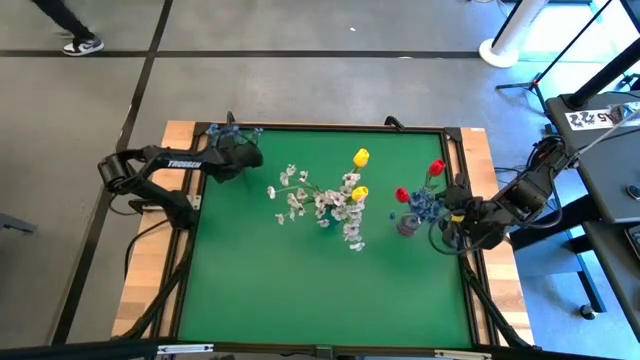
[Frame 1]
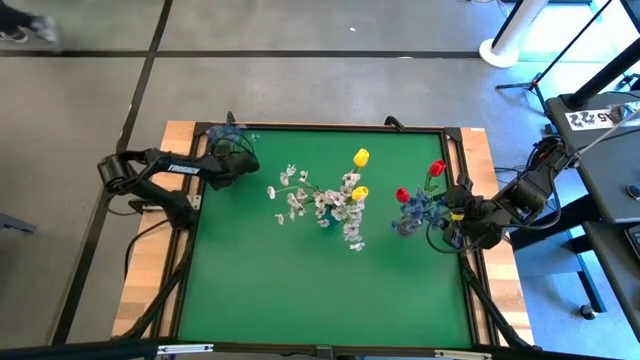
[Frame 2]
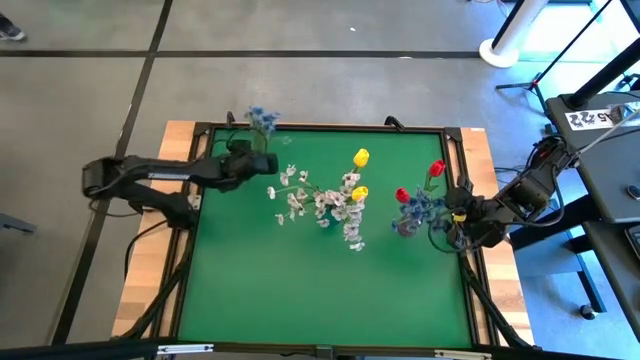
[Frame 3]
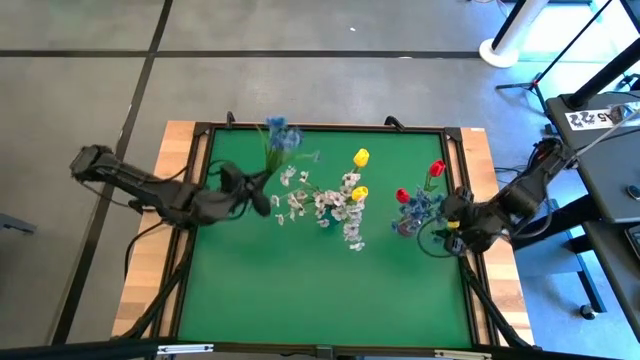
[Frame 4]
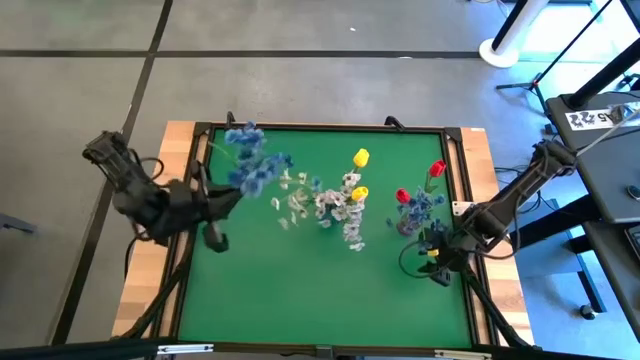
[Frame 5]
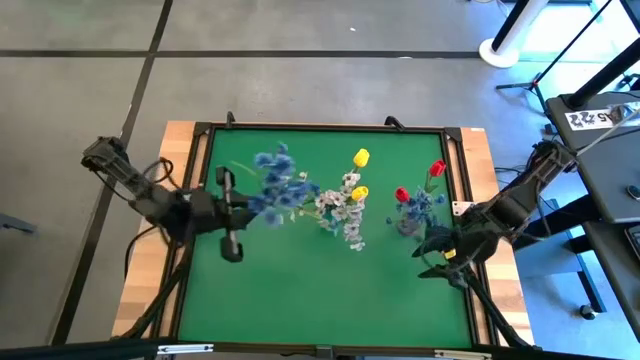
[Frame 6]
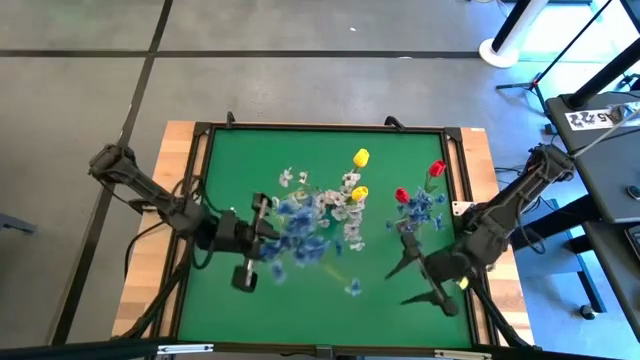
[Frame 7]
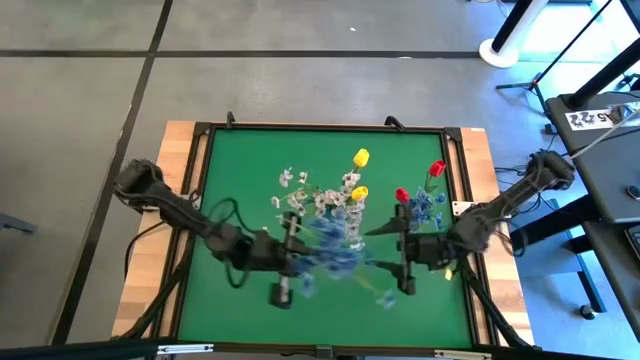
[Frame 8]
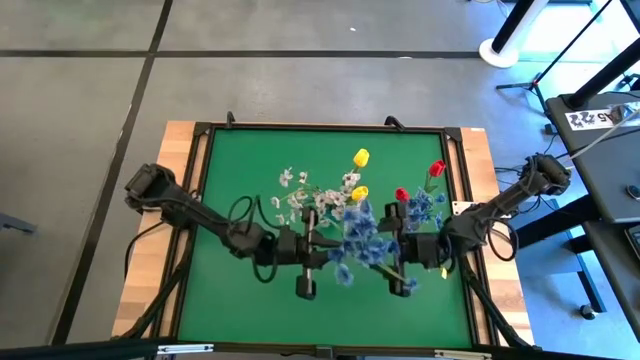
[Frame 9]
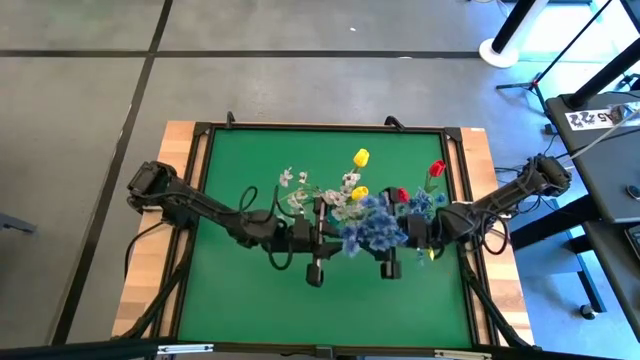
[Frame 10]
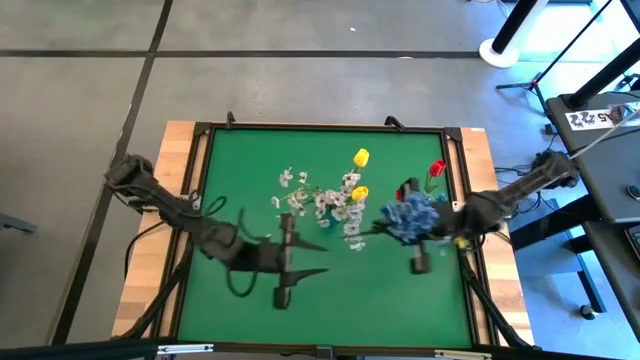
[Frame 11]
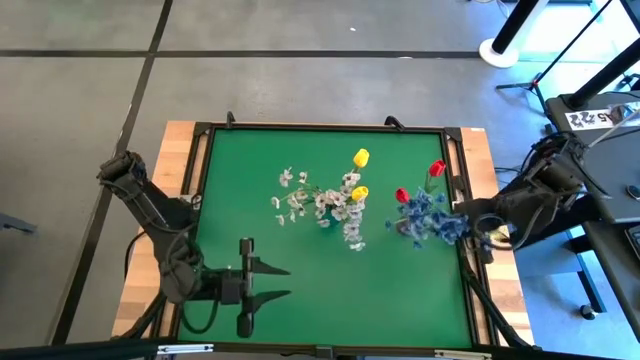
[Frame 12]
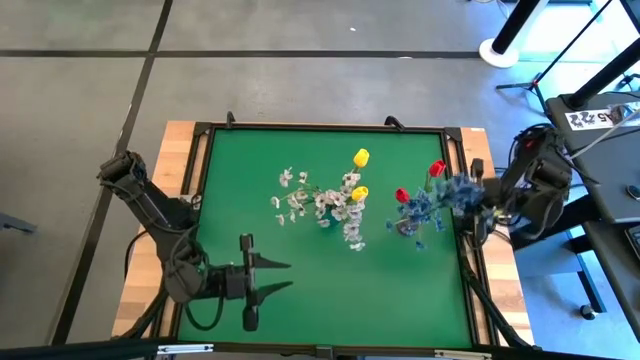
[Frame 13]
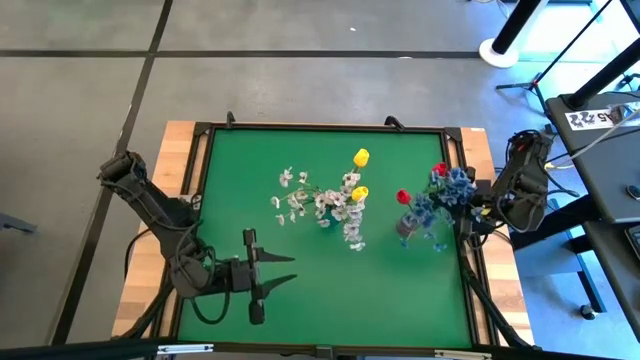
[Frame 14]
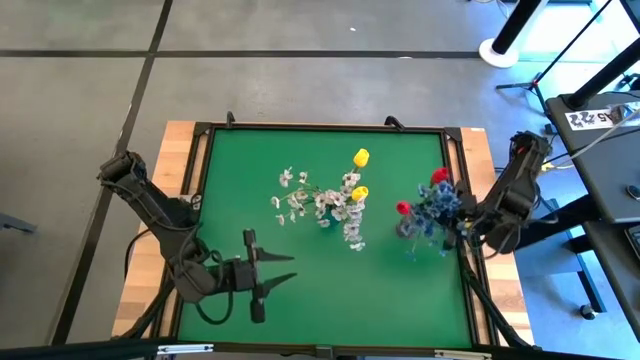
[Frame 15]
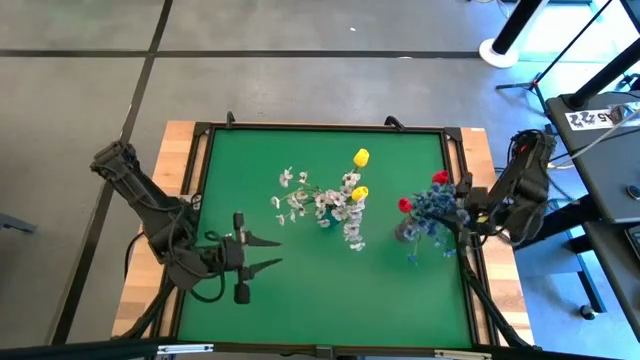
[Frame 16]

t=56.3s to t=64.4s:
Task: Sort flowers into vase by color
Put the blue flowers into the purple vase

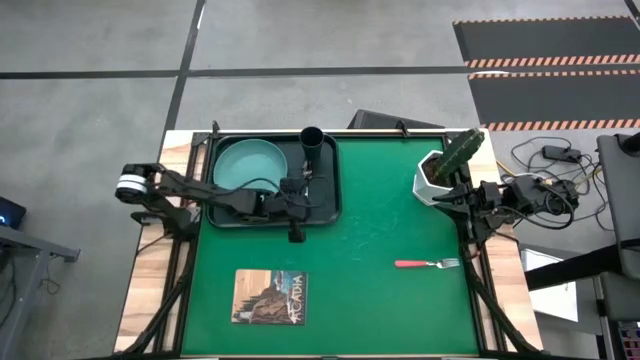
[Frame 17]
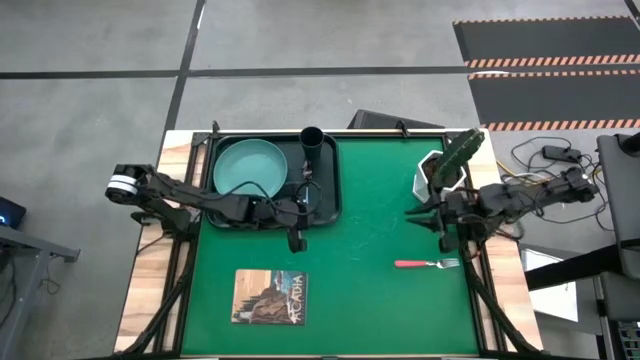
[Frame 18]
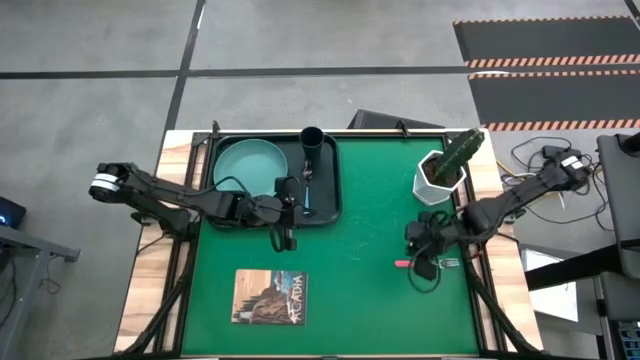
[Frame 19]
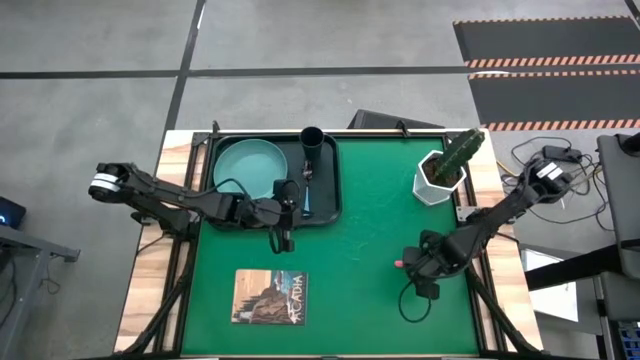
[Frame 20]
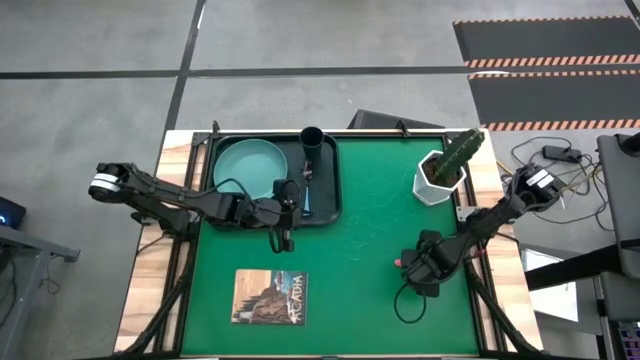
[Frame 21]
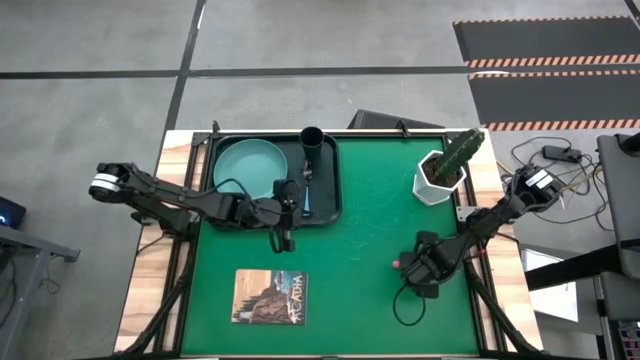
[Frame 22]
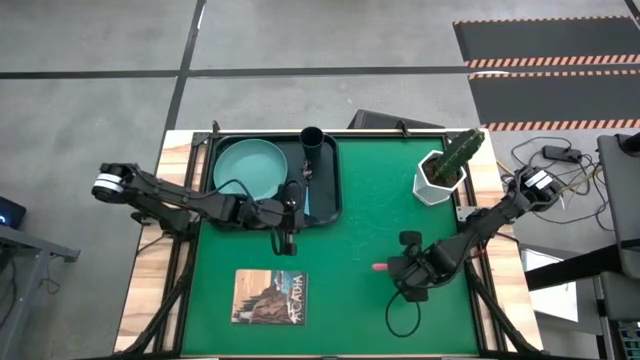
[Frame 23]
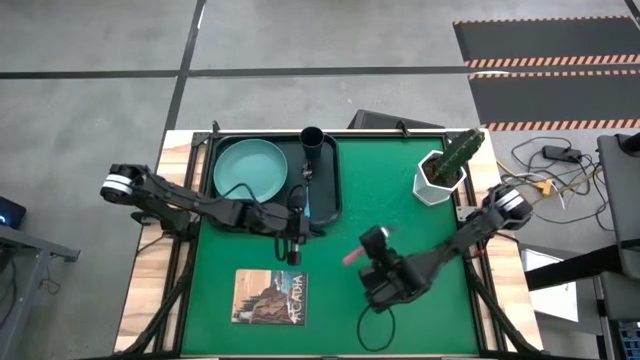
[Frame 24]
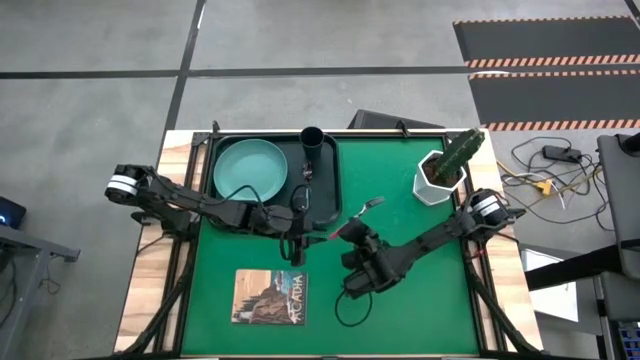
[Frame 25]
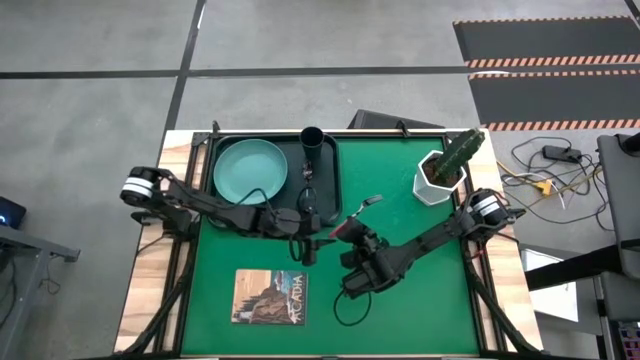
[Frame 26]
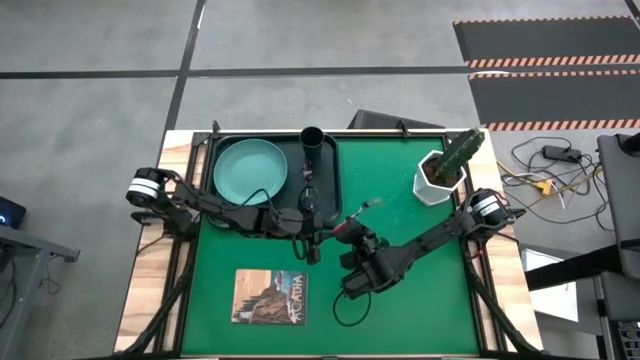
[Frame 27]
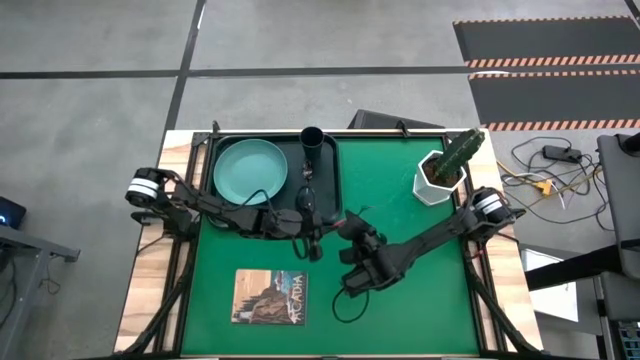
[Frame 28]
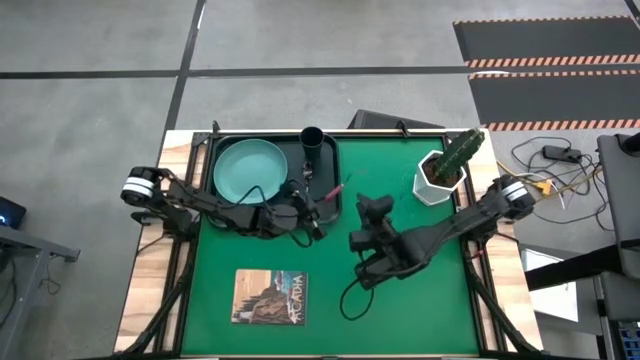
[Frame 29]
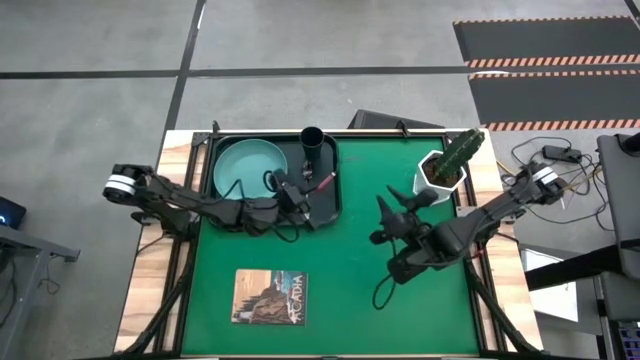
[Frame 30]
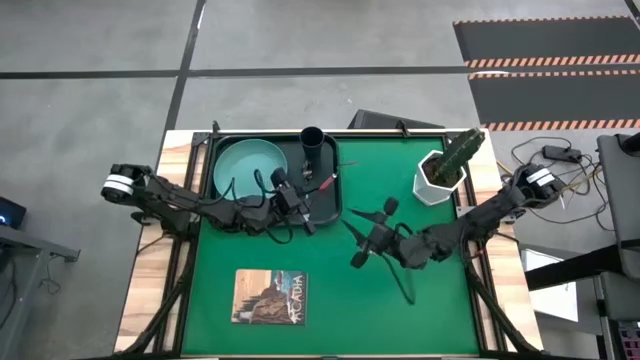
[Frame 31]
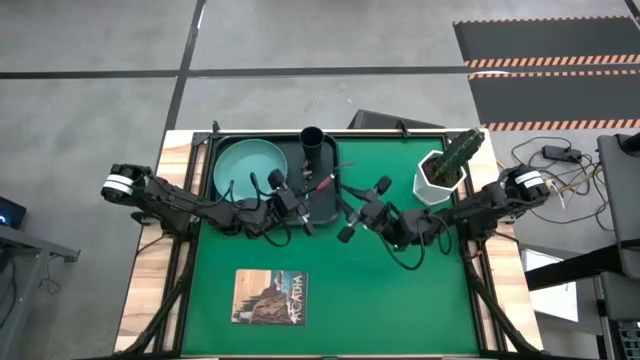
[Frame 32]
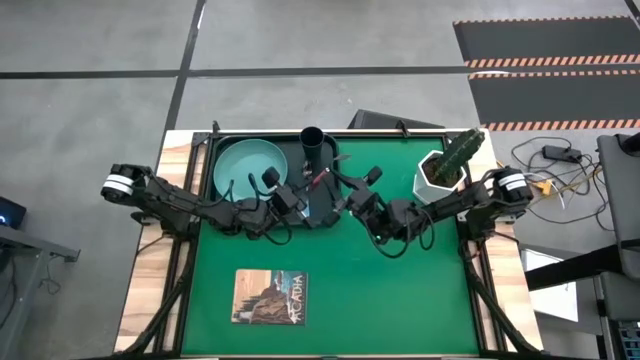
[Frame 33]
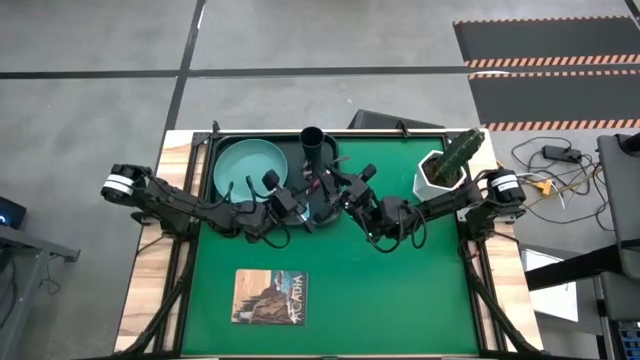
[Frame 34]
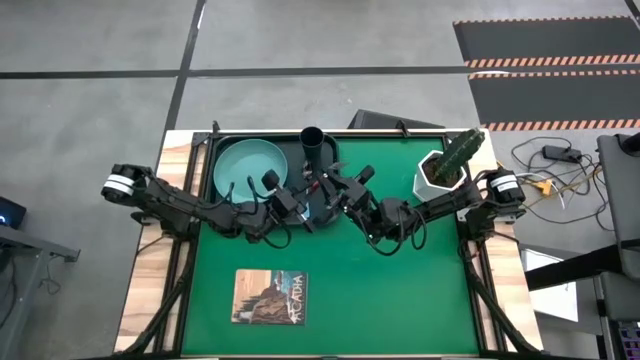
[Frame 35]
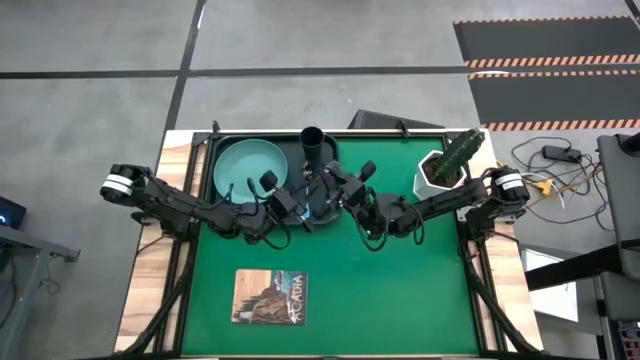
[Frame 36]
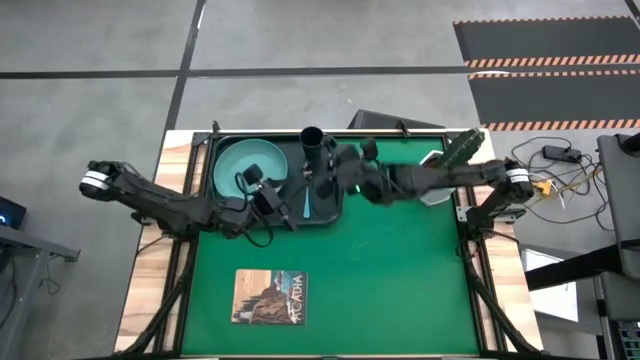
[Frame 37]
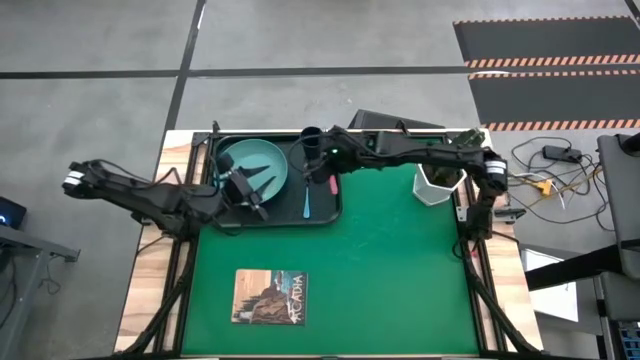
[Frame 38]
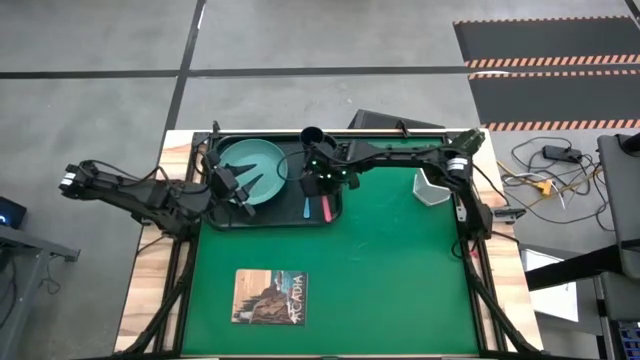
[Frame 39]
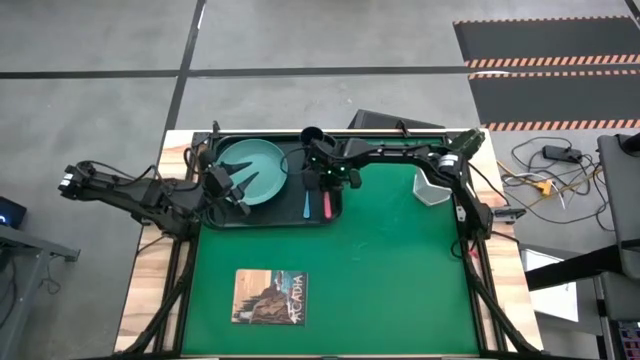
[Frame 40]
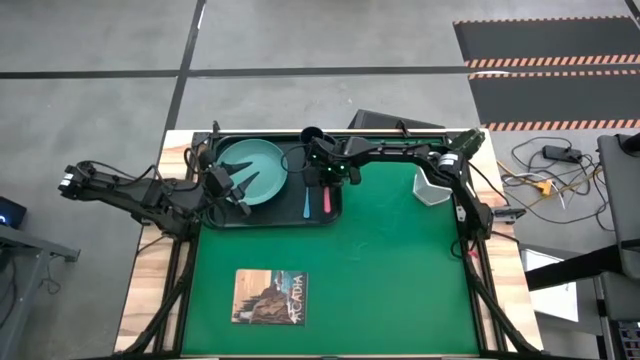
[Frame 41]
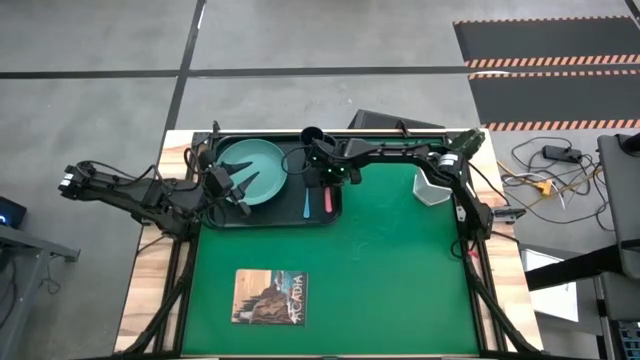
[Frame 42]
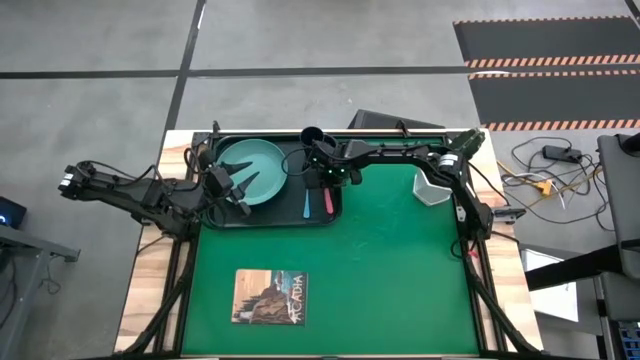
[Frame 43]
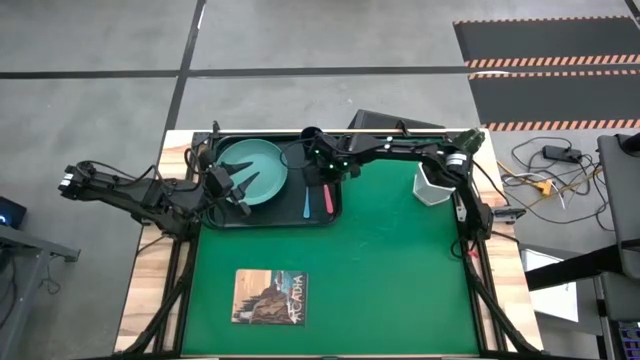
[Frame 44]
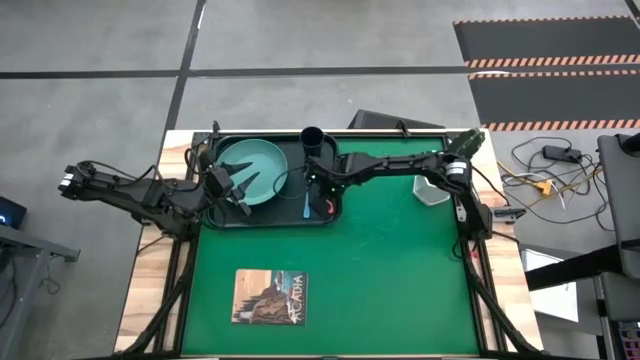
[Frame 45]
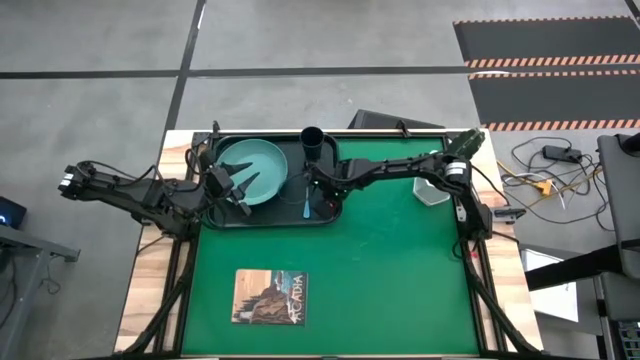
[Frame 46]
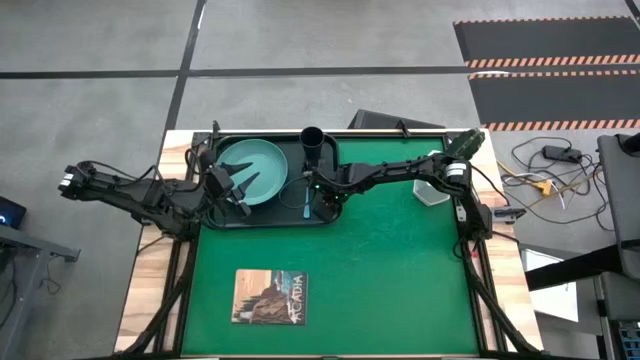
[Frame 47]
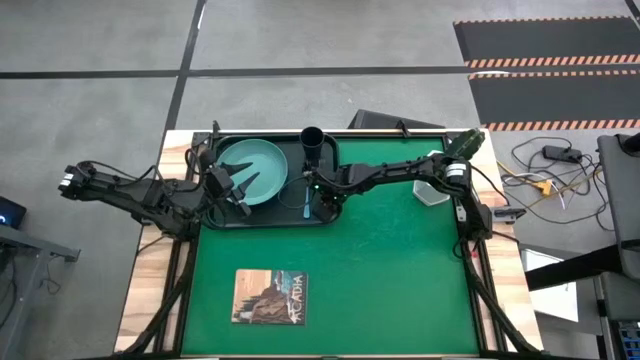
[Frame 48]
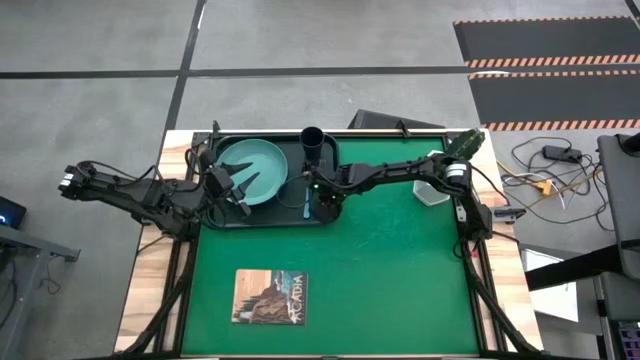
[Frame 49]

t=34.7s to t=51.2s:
Task: Pick and place plate/cup/fork/spoon on tray
Put the pink fork on the black tray to the right of the blue spoon
